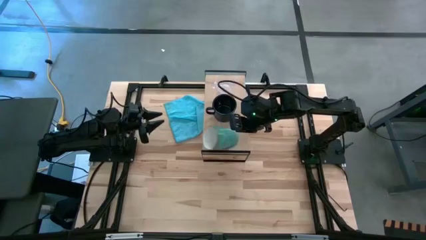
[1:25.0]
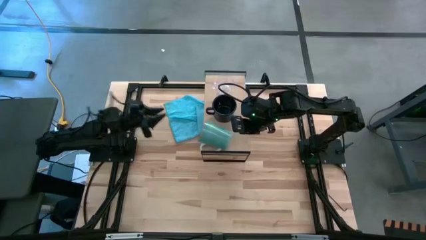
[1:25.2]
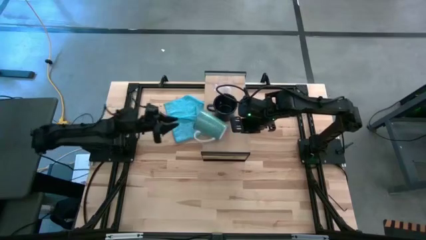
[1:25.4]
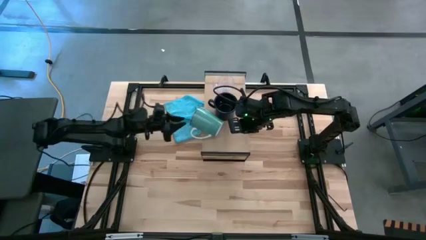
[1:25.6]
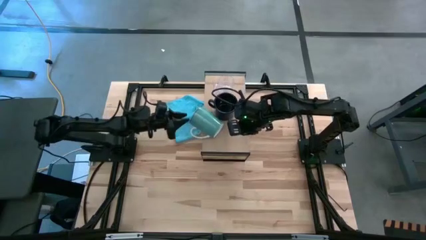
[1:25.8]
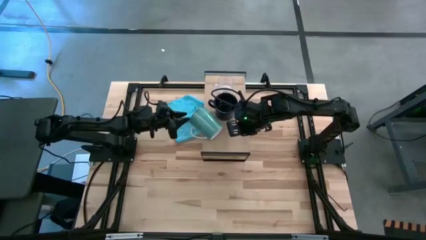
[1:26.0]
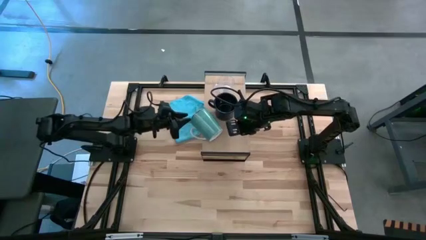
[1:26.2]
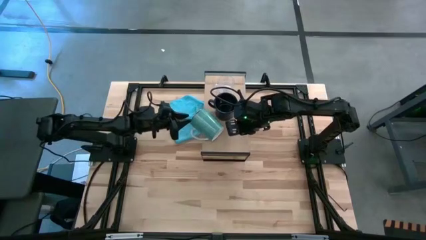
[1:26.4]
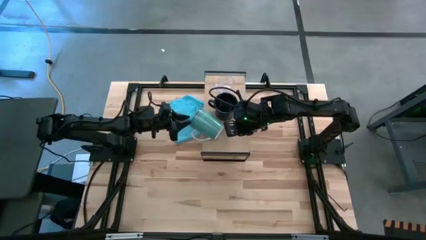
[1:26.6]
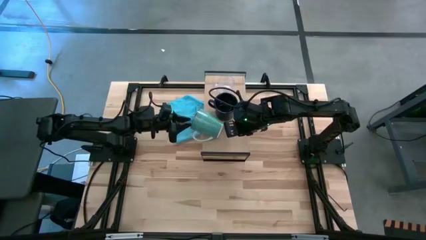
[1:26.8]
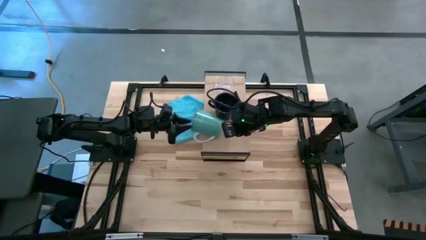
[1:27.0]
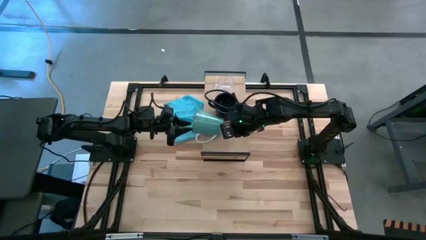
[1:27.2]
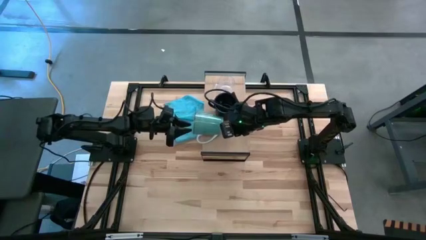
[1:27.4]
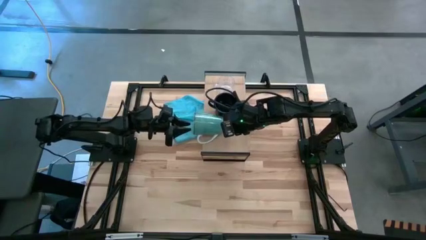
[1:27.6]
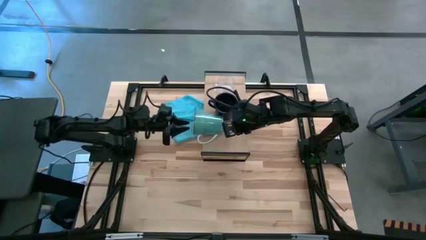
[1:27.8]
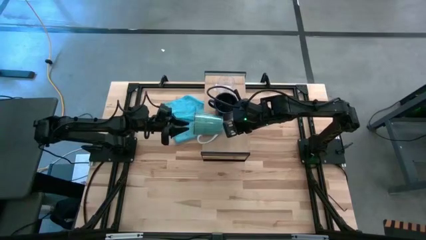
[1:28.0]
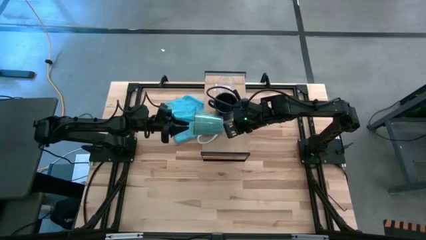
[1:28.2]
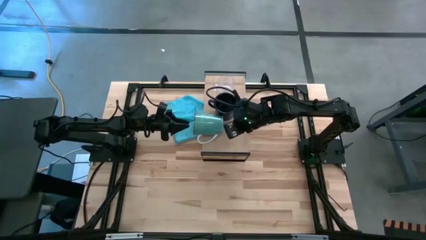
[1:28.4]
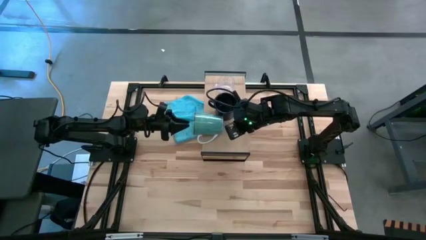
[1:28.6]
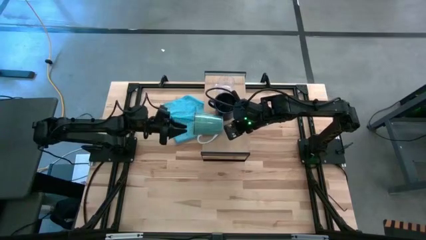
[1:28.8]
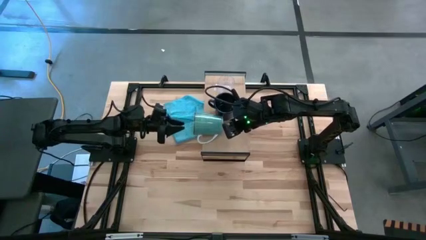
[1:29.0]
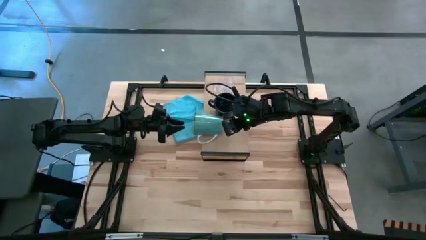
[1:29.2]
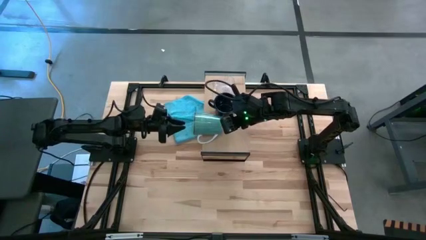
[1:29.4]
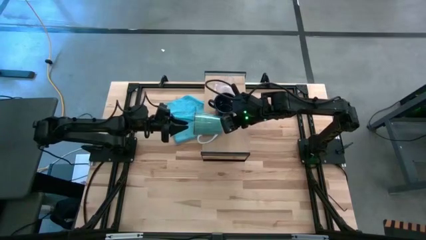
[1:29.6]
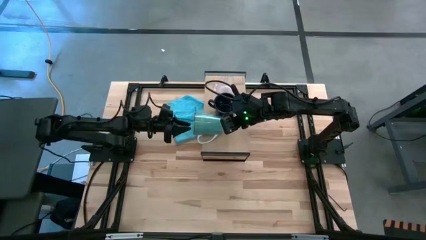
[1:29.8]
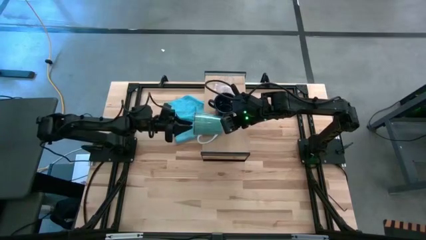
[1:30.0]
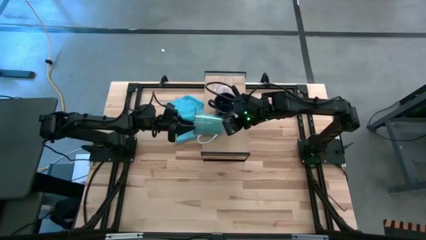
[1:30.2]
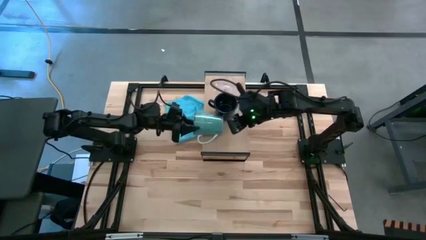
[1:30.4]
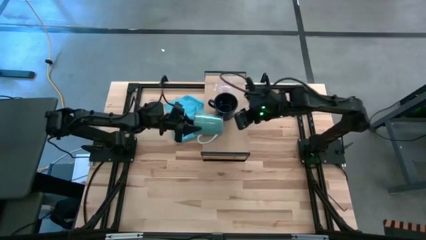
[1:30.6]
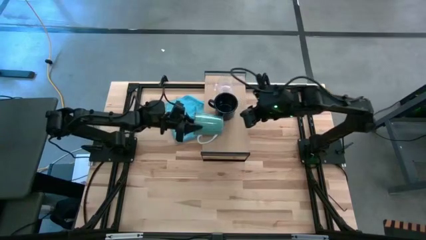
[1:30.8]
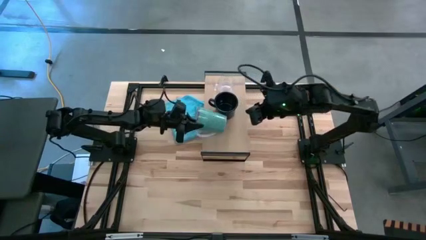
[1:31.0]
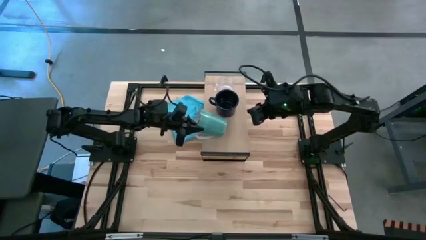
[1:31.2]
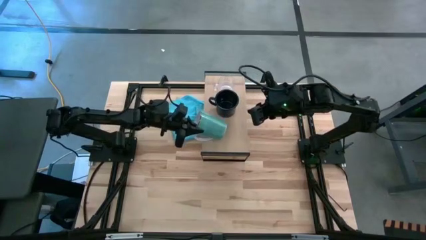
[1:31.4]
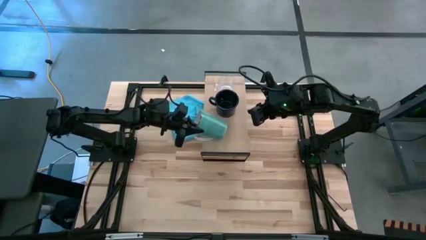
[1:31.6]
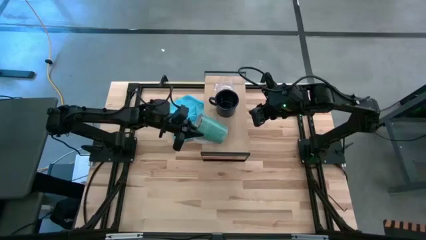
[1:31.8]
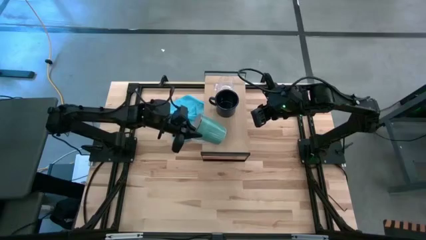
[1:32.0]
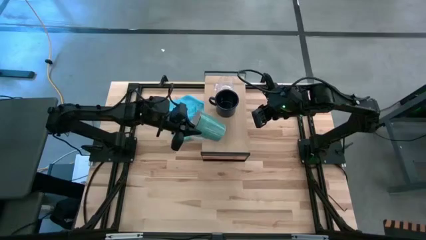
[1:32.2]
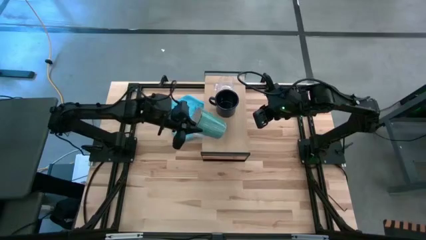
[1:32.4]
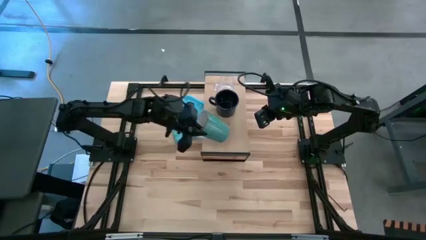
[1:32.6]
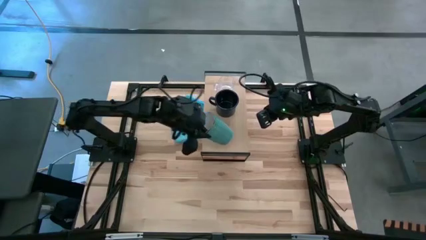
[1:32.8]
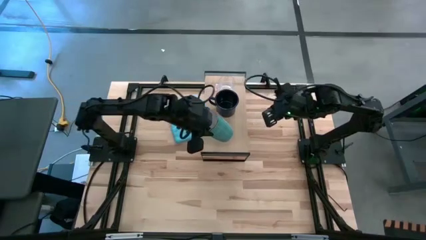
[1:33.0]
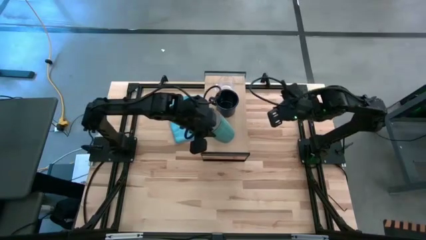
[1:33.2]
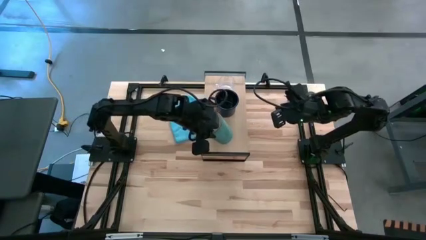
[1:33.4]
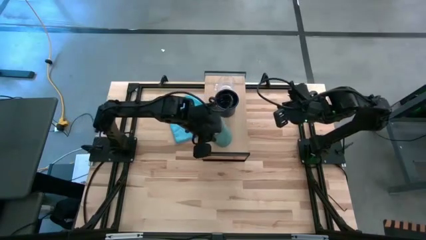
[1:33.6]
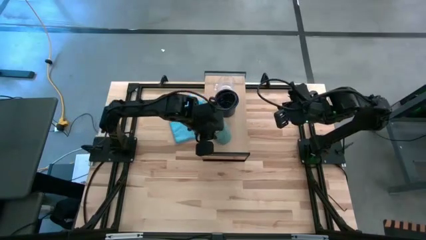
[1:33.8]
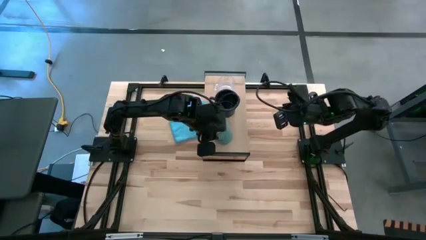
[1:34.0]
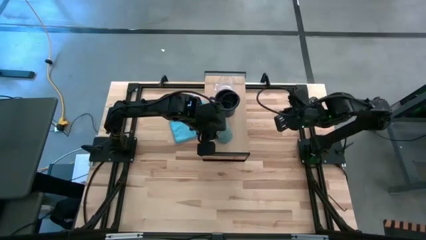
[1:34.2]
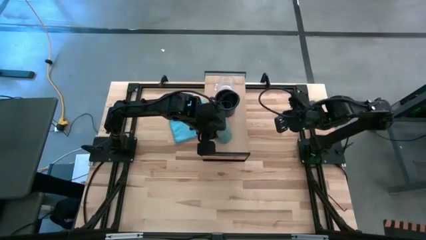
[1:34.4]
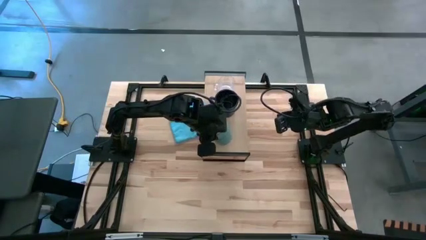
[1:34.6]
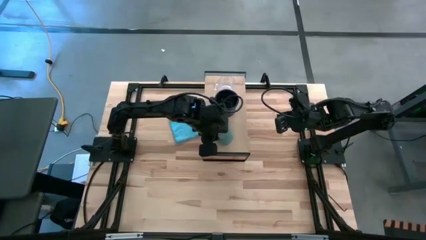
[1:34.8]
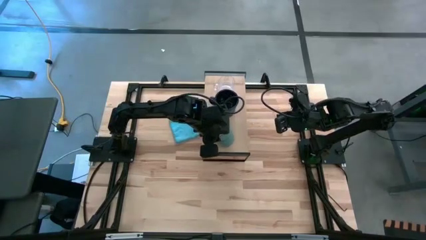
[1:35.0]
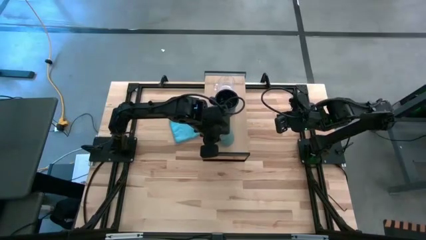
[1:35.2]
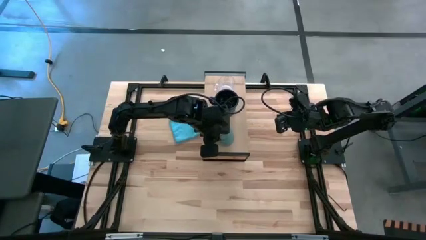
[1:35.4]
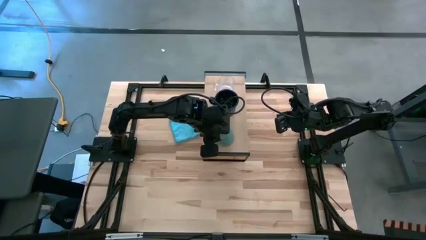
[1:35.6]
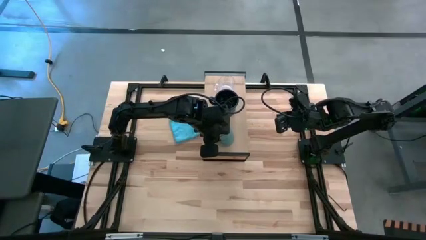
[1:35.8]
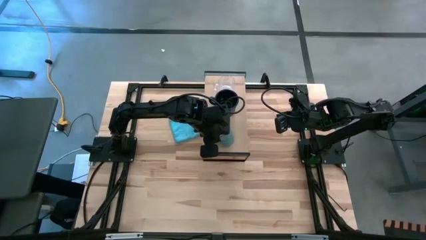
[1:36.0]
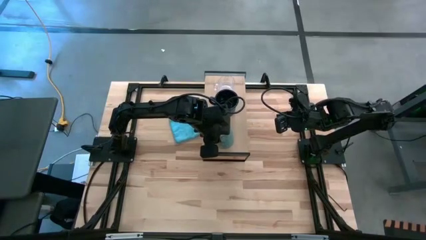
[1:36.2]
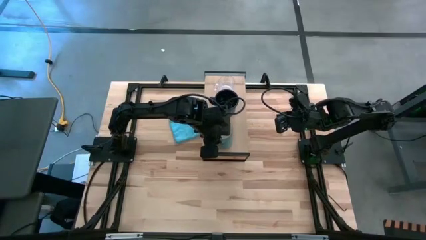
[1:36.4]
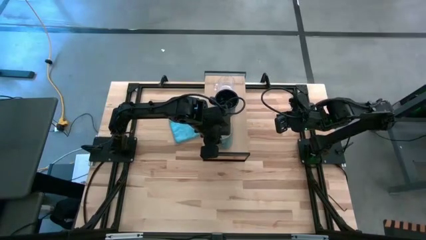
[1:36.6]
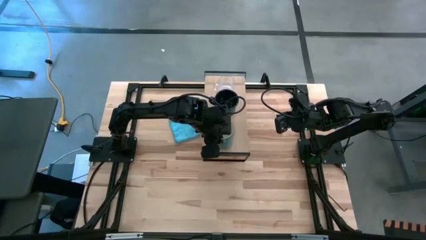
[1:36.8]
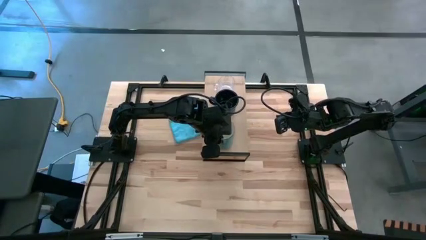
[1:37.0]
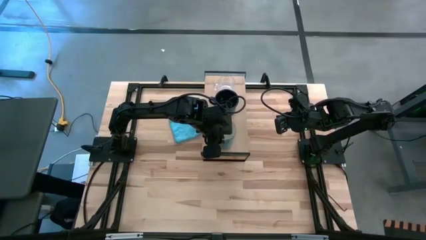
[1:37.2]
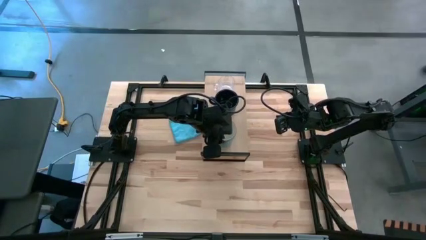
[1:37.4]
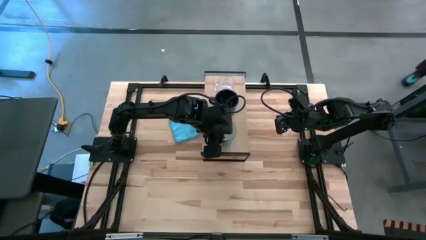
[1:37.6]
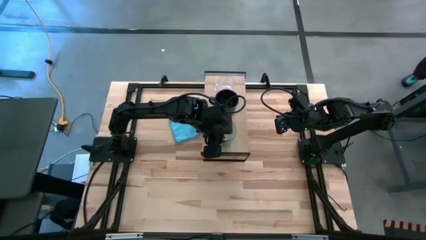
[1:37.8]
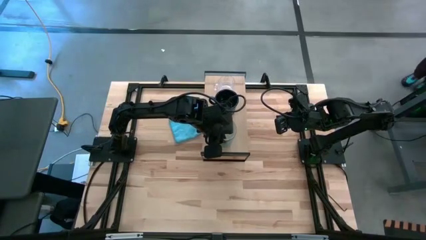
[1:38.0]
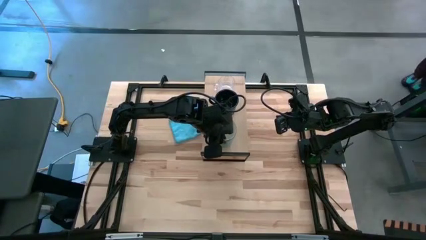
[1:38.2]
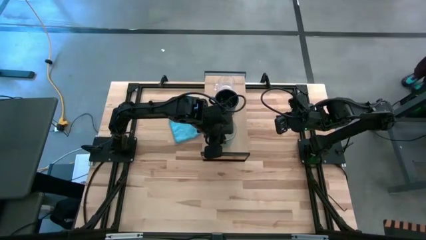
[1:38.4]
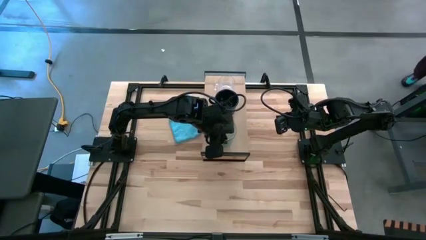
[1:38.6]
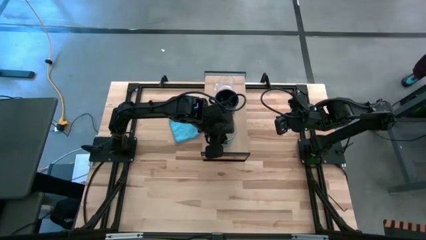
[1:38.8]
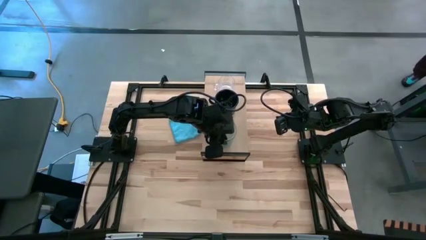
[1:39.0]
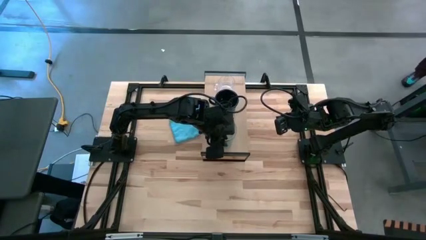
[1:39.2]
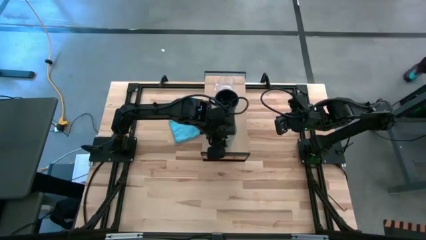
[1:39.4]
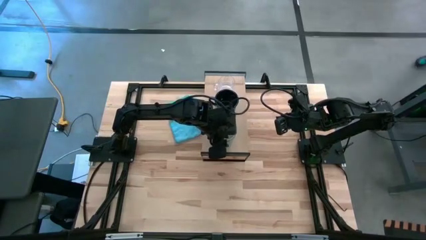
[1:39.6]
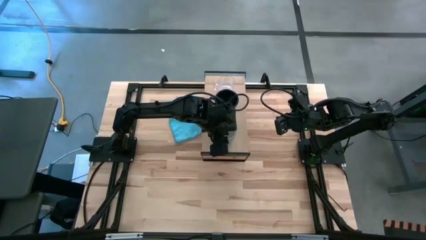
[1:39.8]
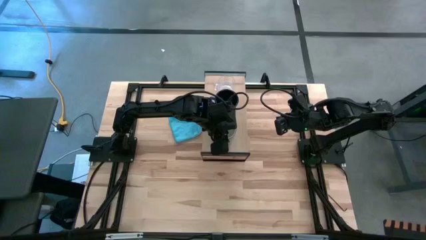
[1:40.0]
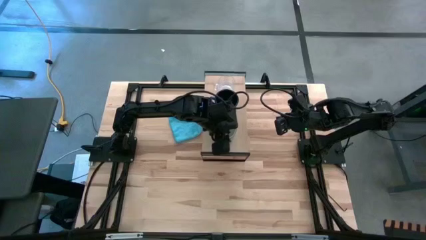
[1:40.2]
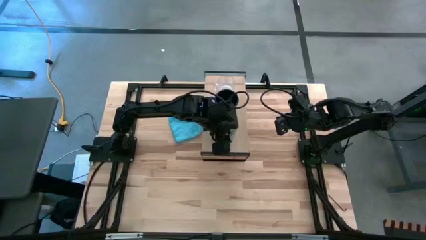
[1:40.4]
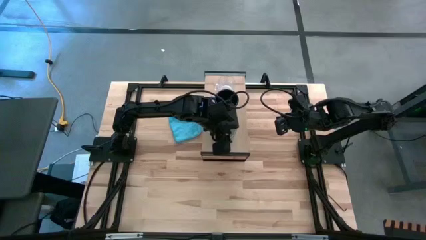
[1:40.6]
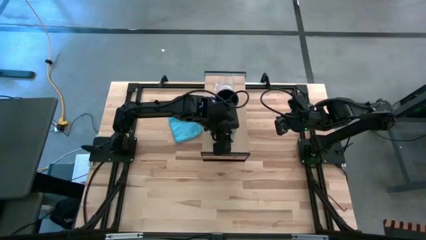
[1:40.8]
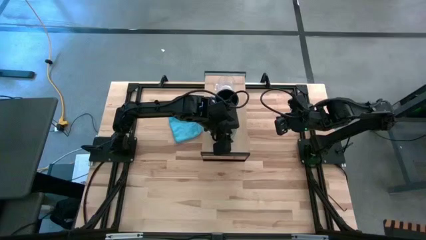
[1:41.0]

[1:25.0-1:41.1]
Task: Stack small to large cups/mugs on shelf
Put the light blue mug on the shelf
